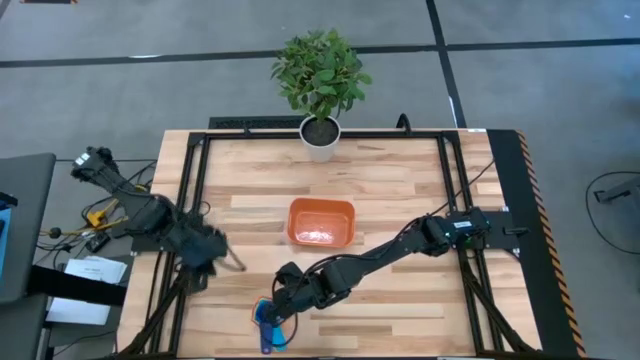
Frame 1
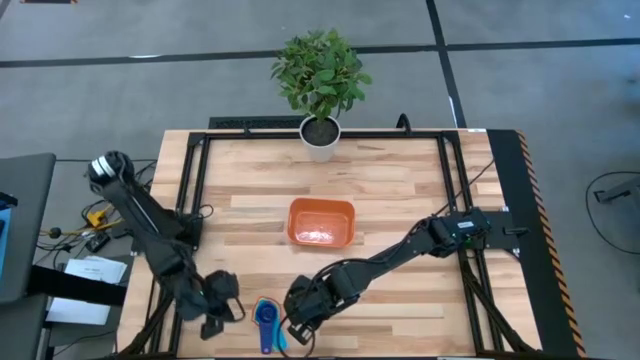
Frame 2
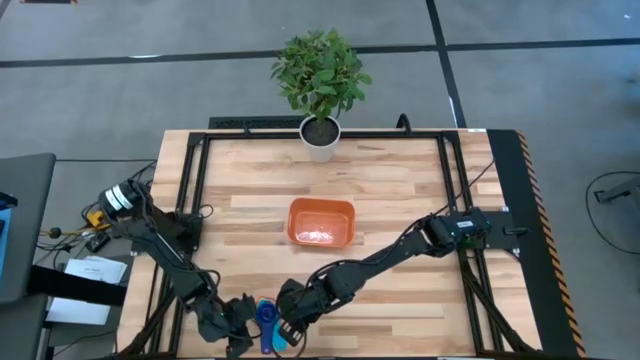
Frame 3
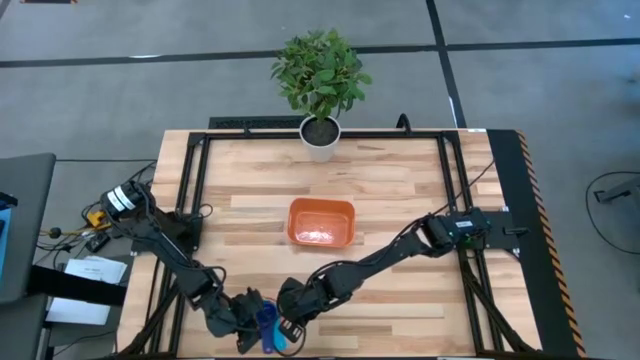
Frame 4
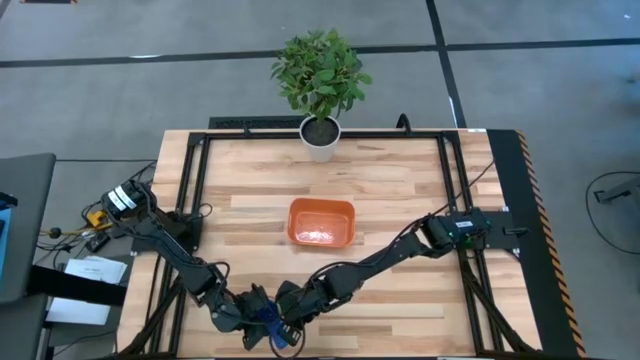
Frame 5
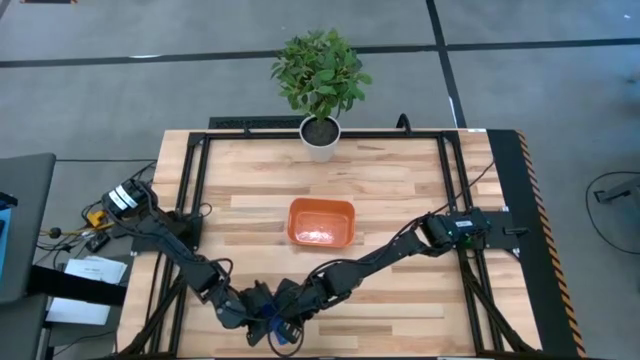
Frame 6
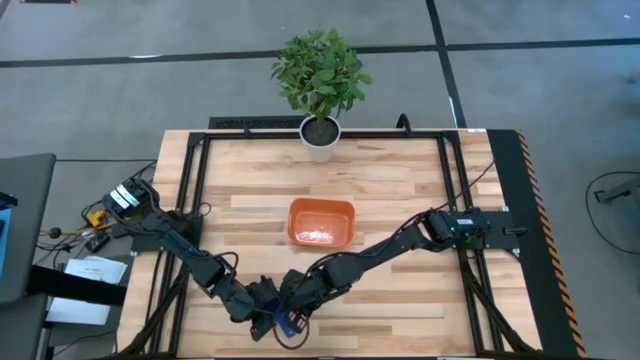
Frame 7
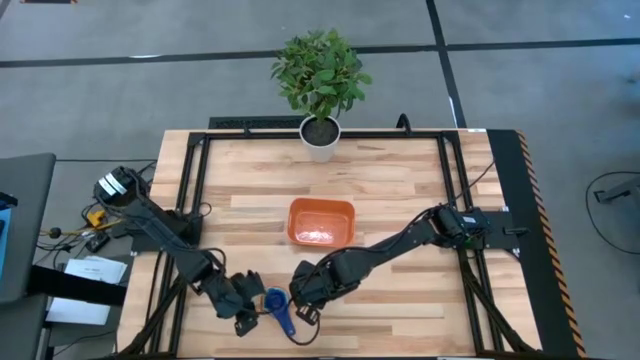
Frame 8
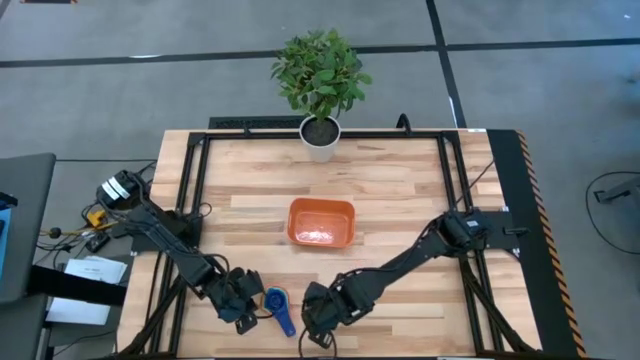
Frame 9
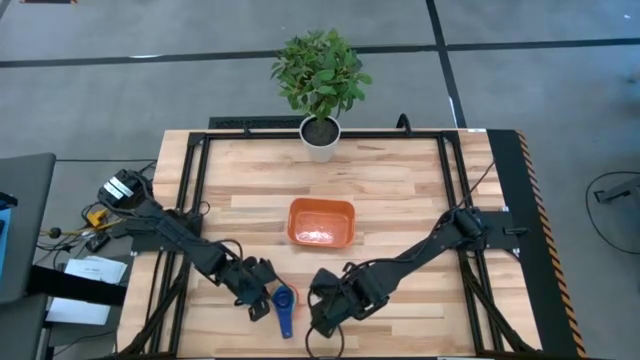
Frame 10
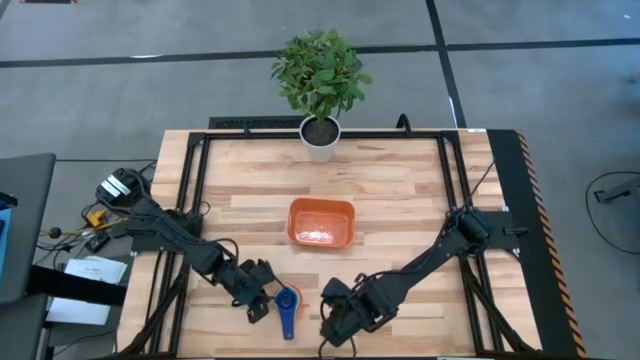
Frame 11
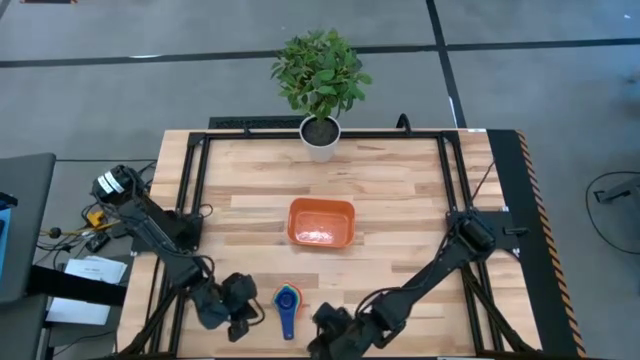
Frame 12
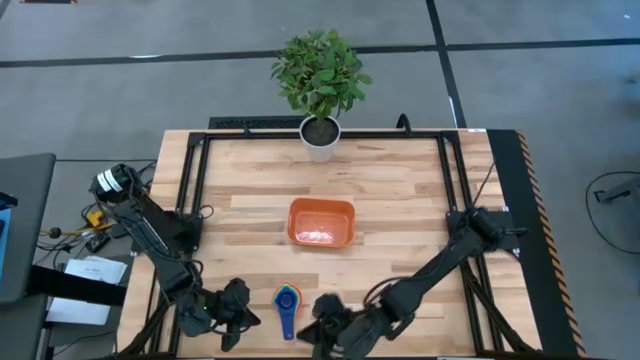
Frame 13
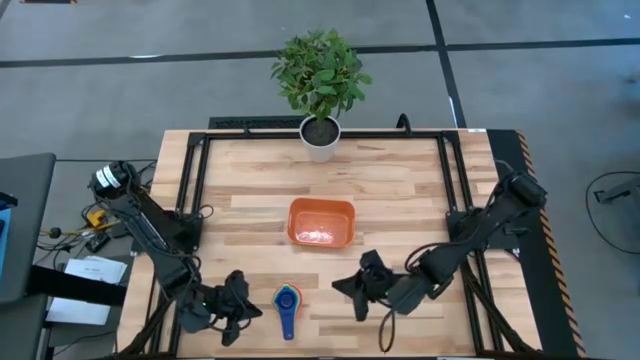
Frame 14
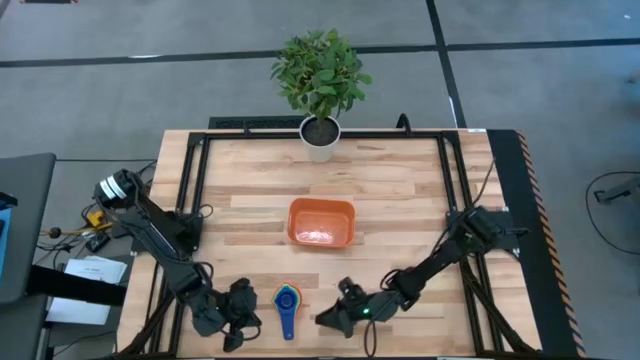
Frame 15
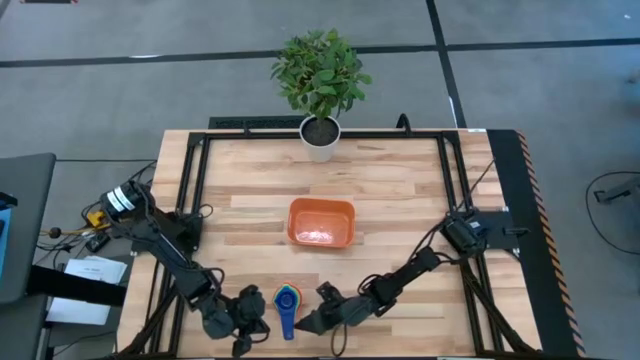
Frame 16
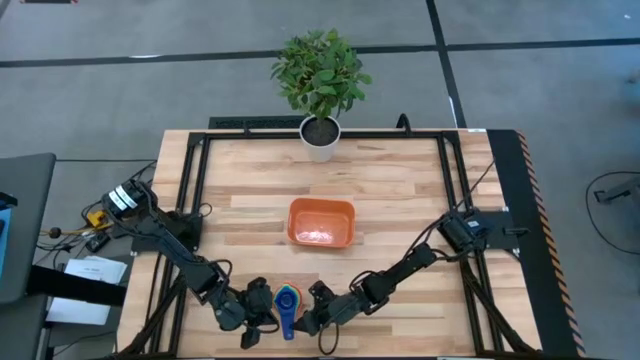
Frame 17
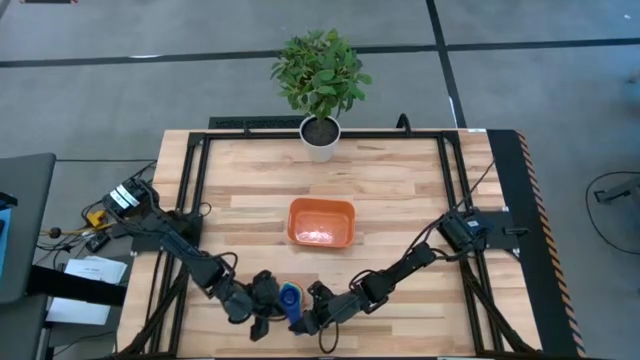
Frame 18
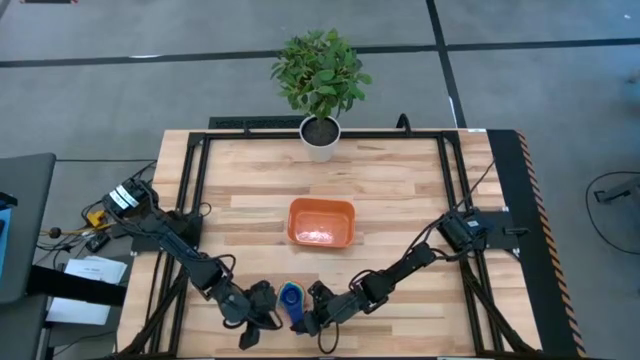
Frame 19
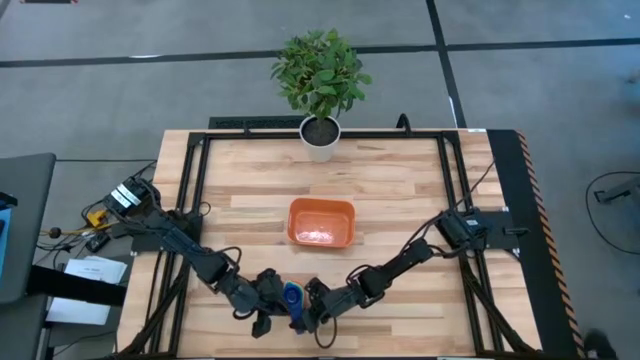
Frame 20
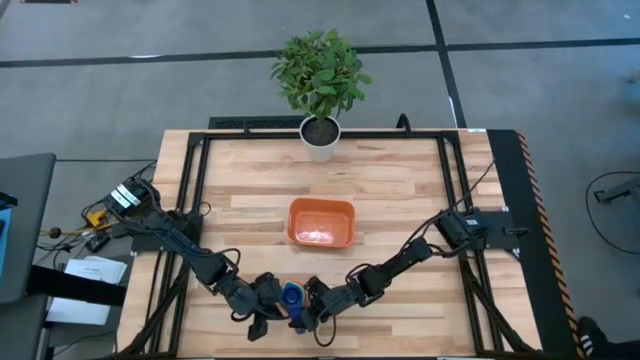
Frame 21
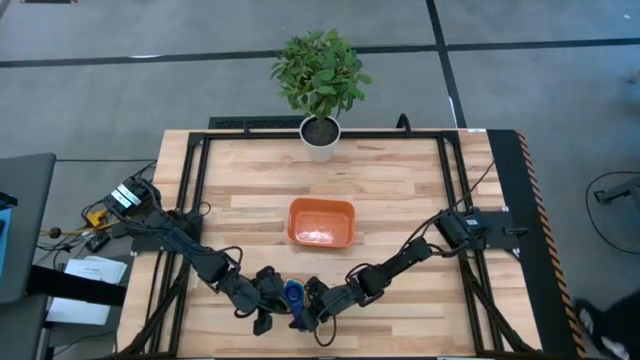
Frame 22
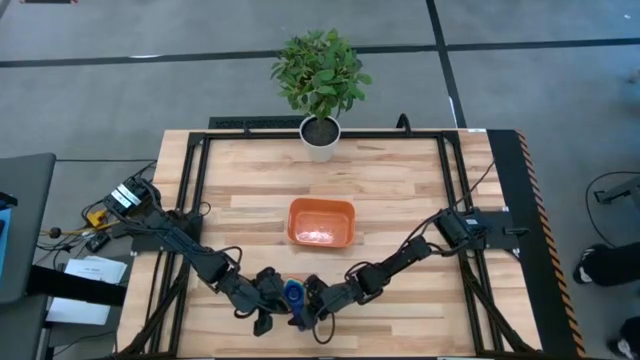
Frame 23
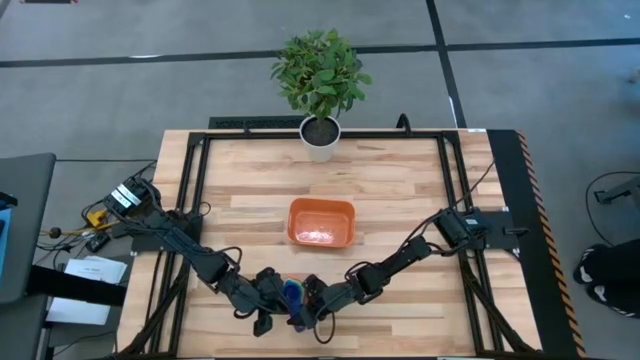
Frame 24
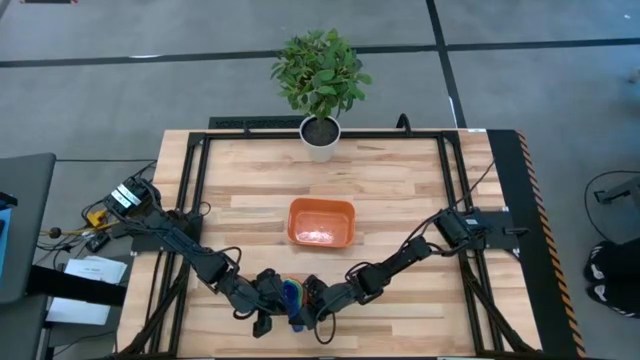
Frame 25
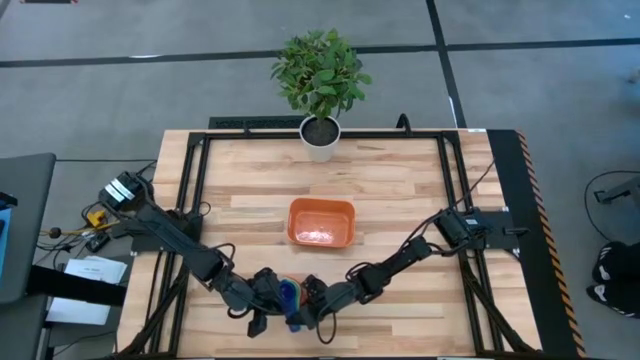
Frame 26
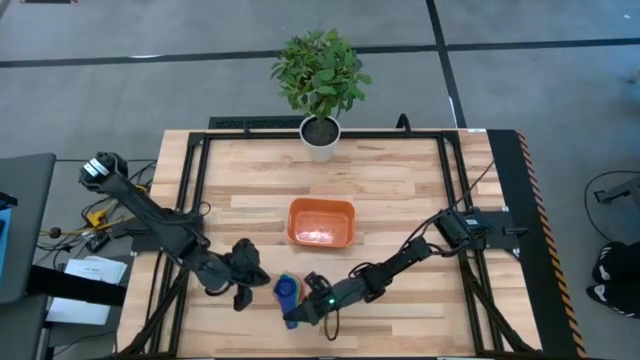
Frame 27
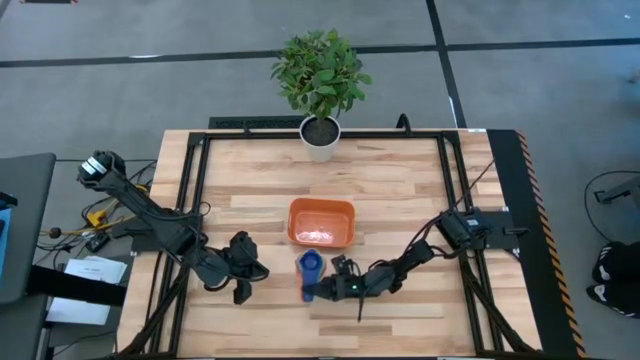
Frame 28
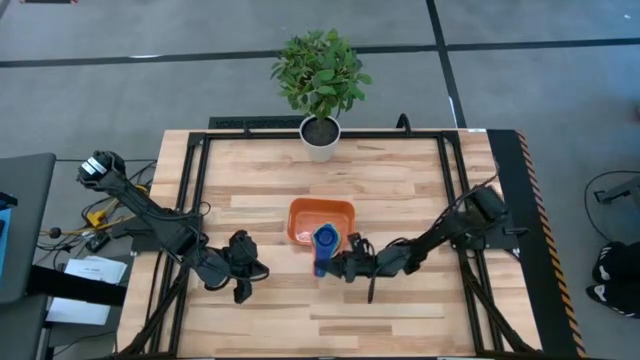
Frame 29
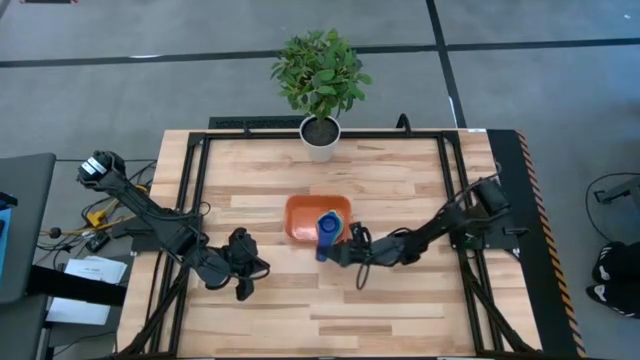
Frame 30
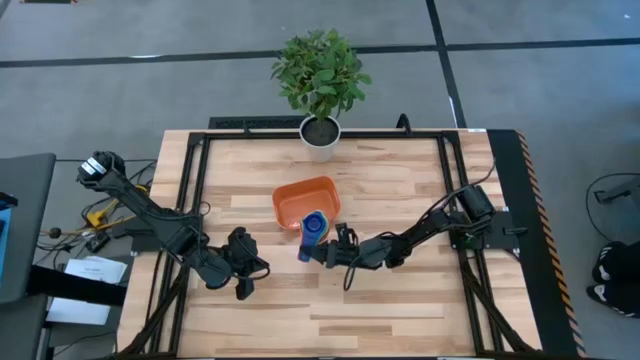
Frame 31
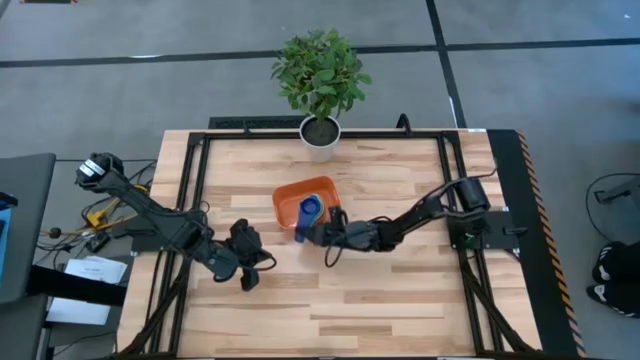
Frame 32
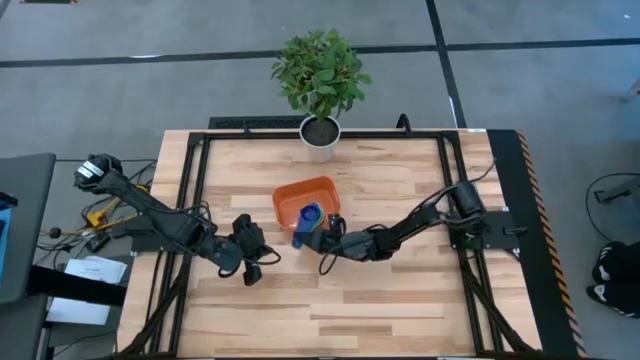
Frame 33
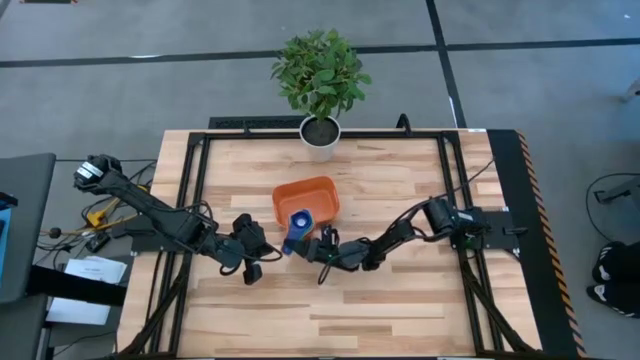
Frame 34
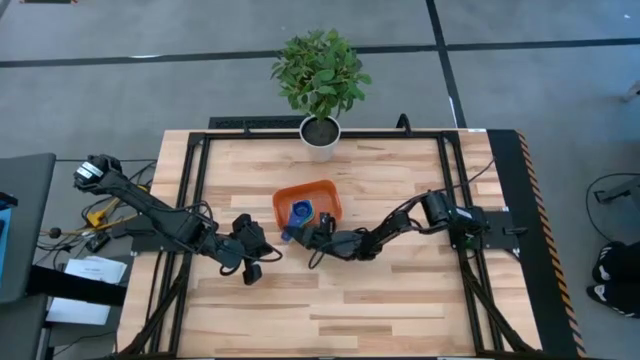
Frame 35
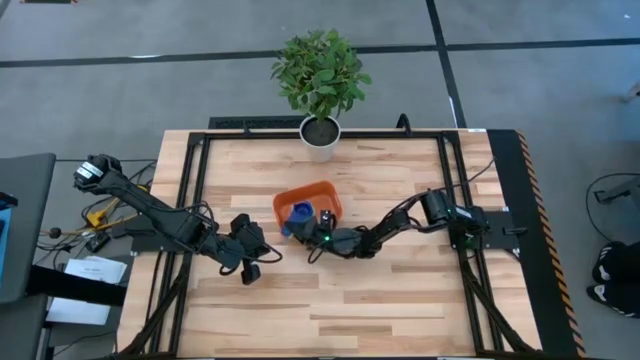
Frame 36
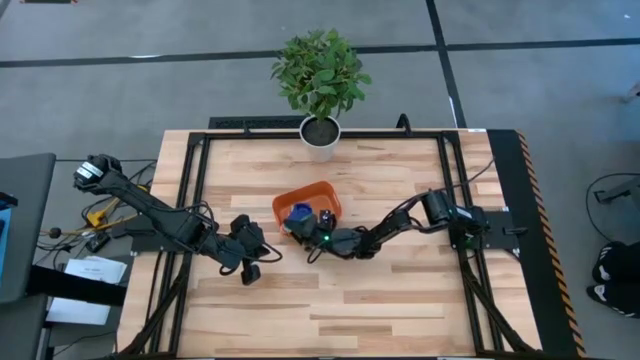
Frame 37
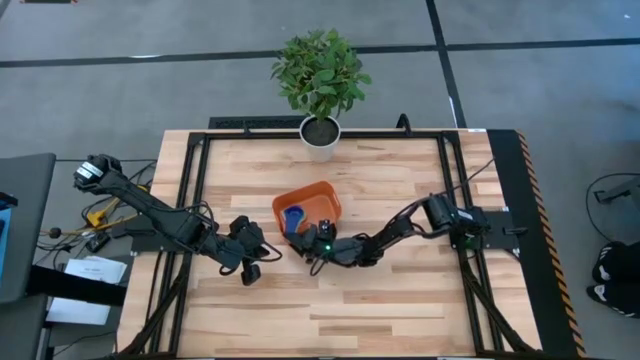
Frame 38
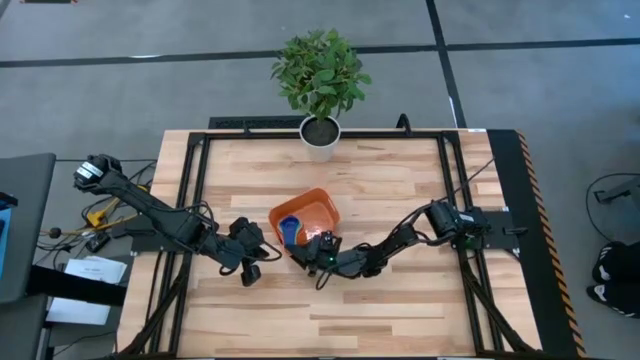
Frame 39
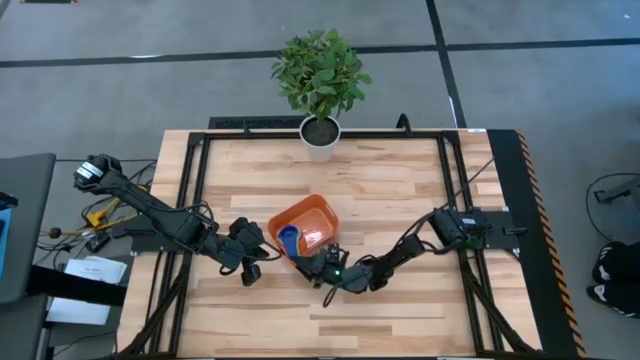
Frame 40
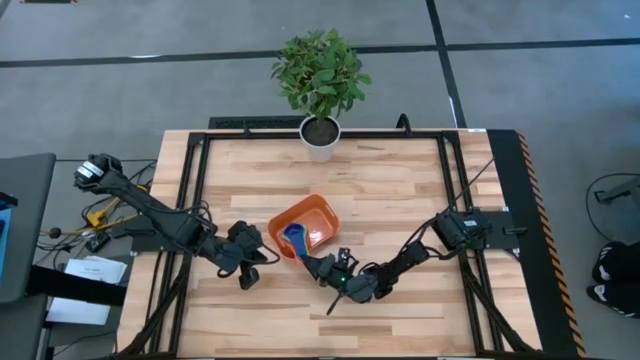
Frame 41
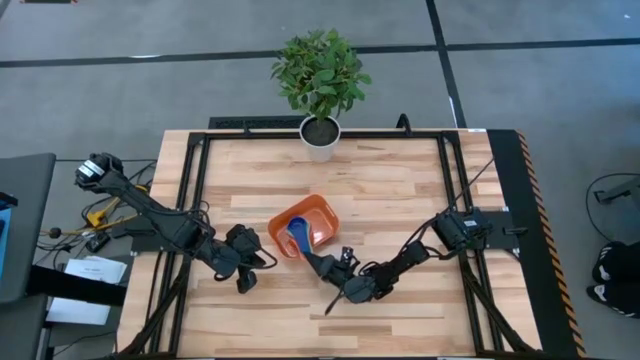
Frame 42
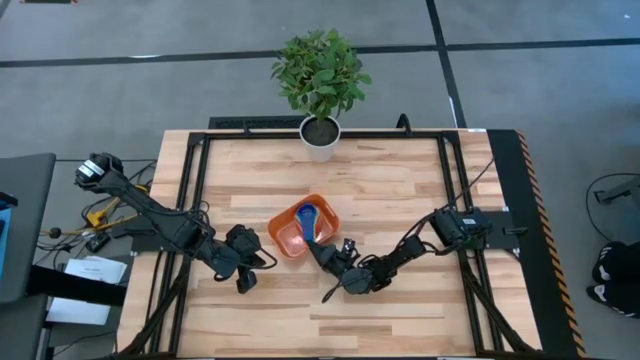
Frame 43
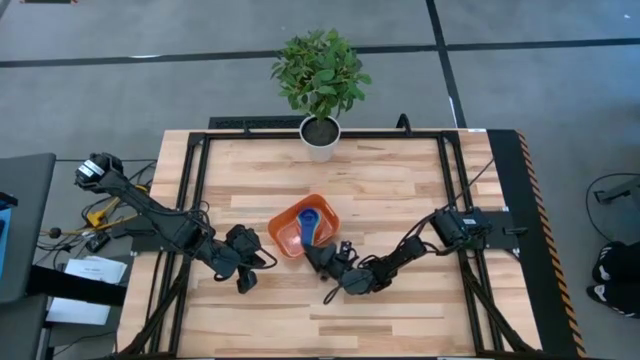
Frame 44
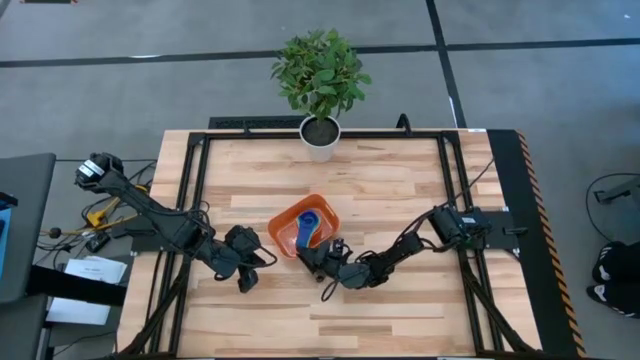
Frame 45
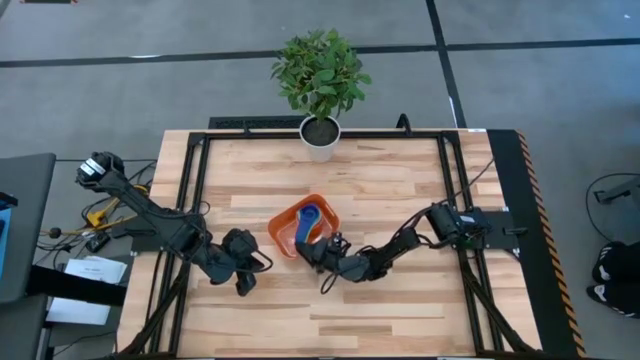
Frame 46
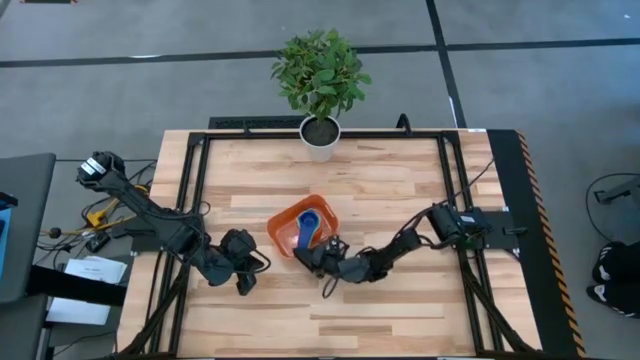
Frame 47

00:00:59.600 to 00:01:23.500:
Task: Nest measuring cups in basket
Put the colored measuring cups into the orange bin
